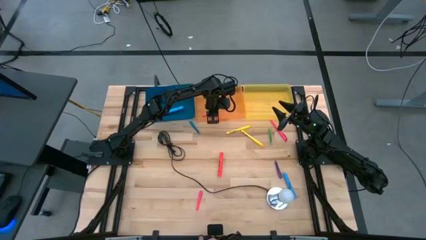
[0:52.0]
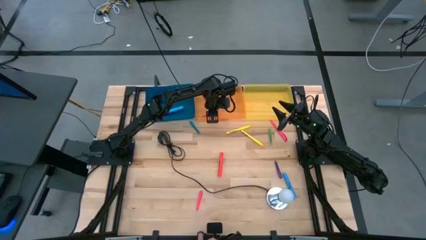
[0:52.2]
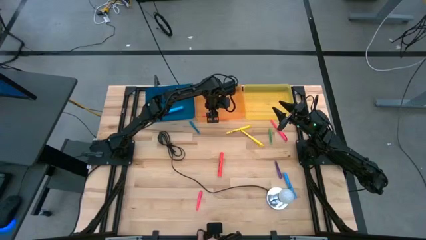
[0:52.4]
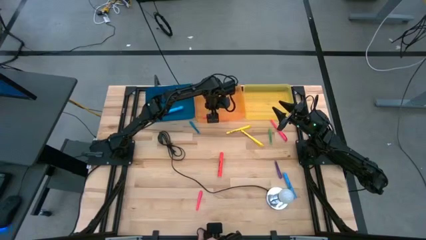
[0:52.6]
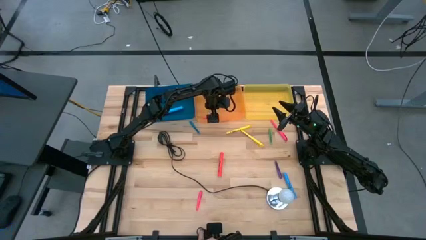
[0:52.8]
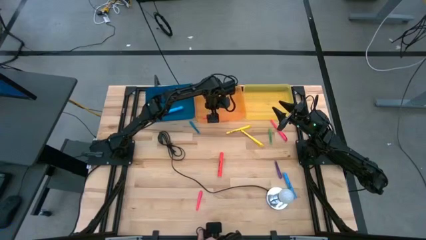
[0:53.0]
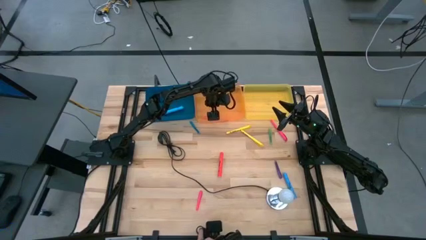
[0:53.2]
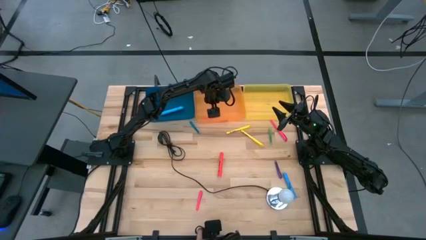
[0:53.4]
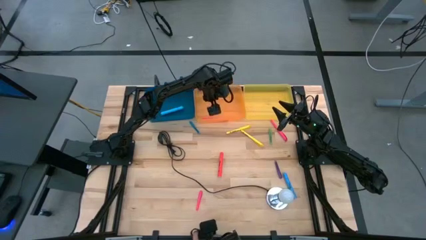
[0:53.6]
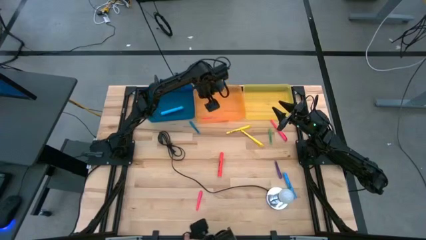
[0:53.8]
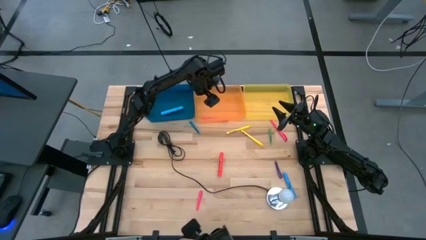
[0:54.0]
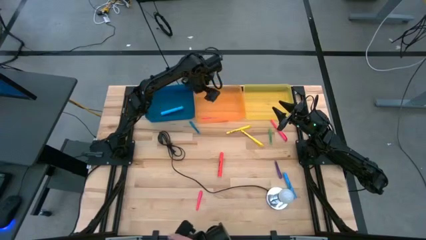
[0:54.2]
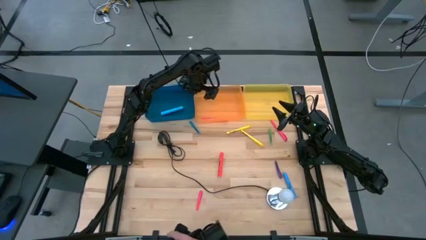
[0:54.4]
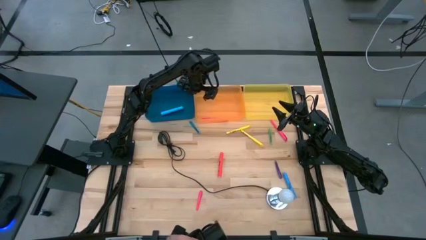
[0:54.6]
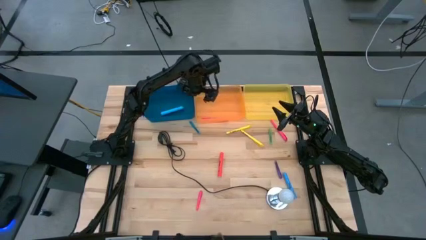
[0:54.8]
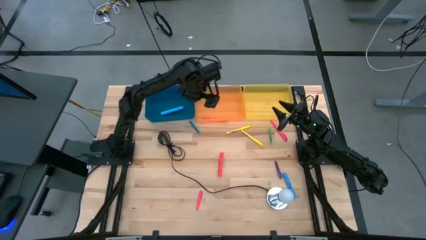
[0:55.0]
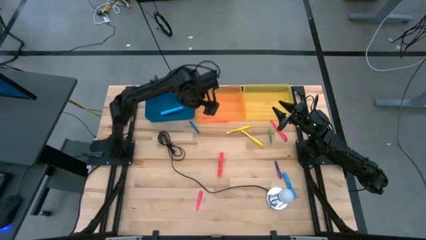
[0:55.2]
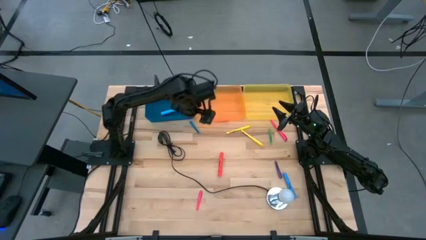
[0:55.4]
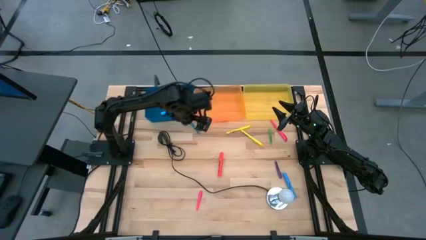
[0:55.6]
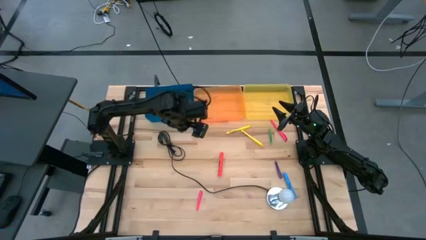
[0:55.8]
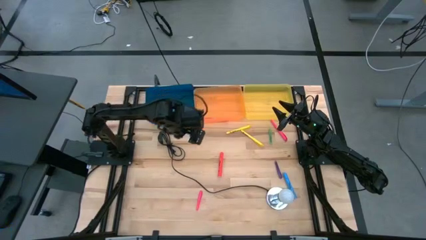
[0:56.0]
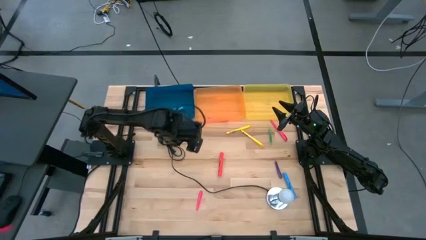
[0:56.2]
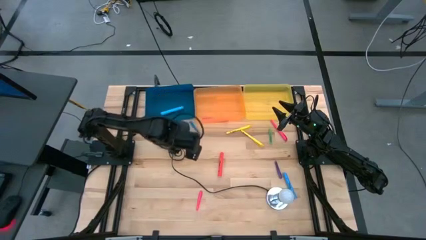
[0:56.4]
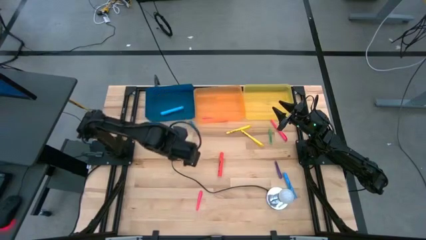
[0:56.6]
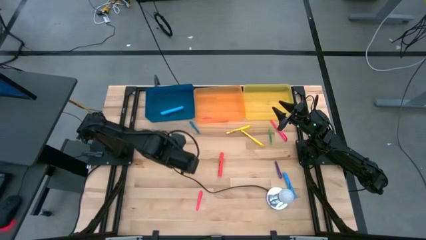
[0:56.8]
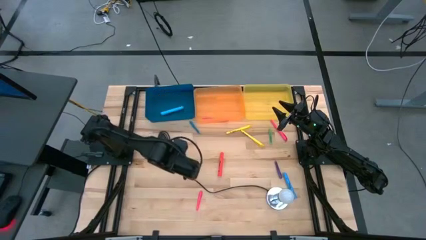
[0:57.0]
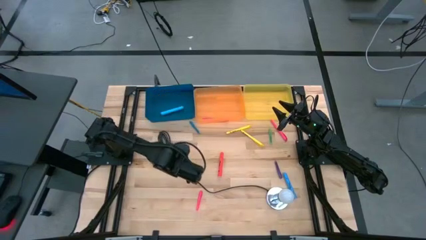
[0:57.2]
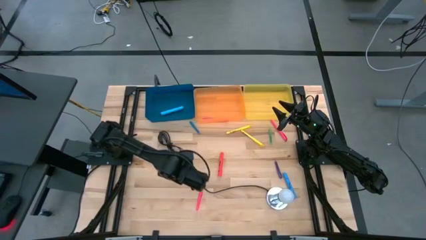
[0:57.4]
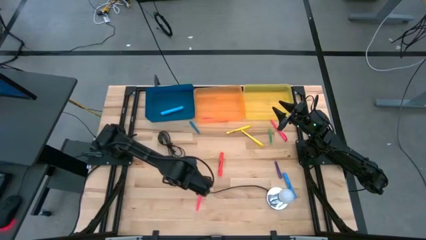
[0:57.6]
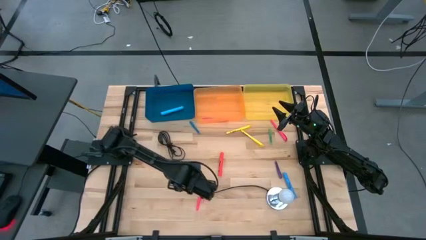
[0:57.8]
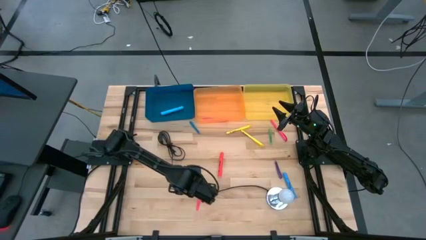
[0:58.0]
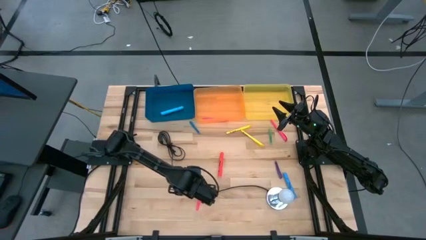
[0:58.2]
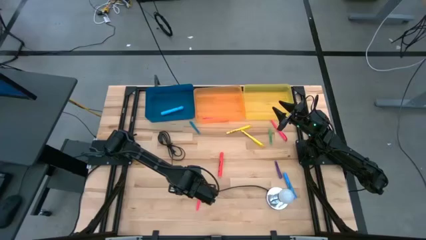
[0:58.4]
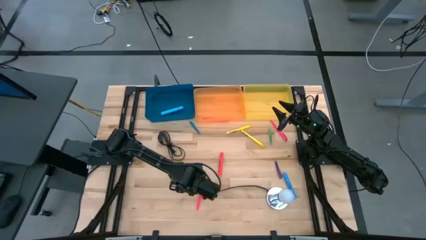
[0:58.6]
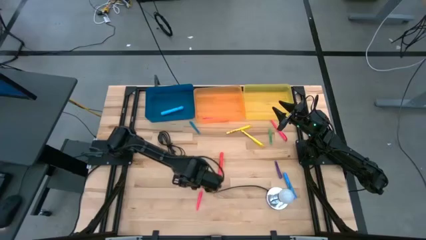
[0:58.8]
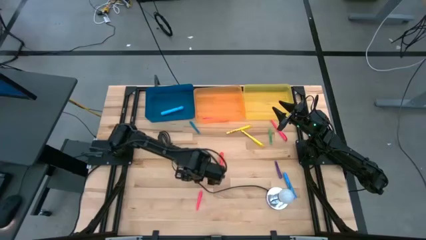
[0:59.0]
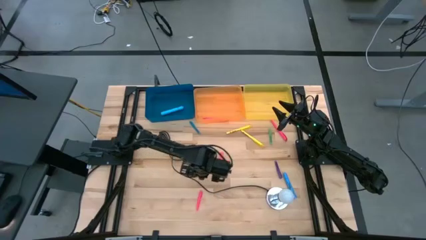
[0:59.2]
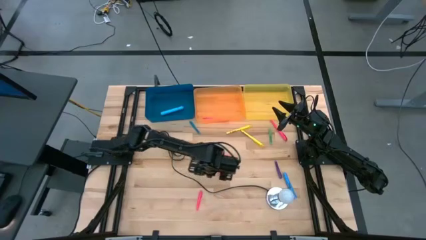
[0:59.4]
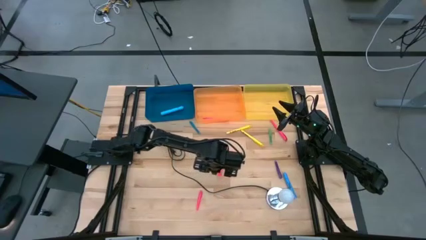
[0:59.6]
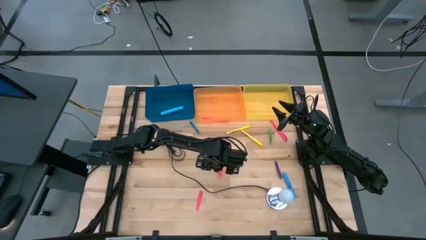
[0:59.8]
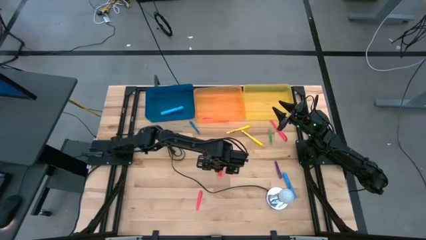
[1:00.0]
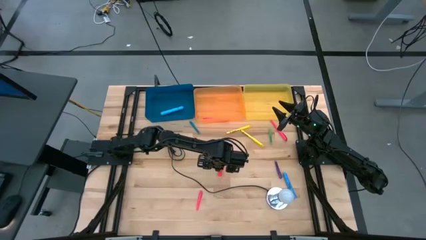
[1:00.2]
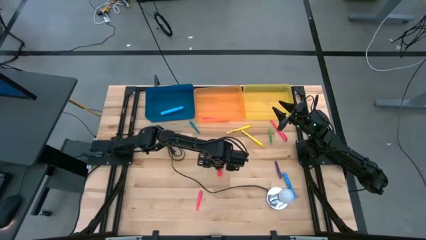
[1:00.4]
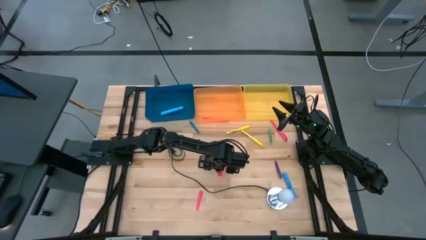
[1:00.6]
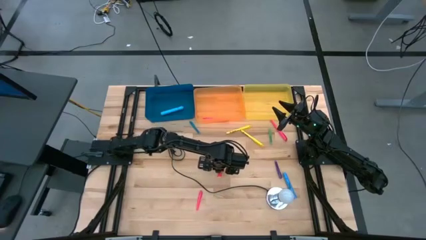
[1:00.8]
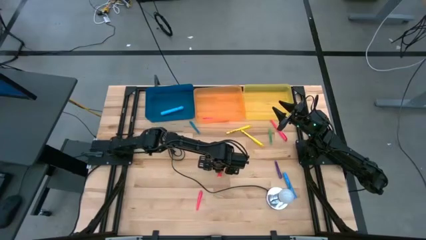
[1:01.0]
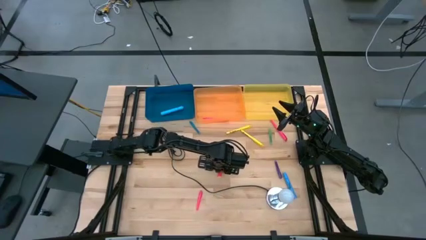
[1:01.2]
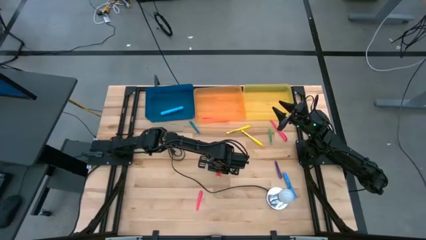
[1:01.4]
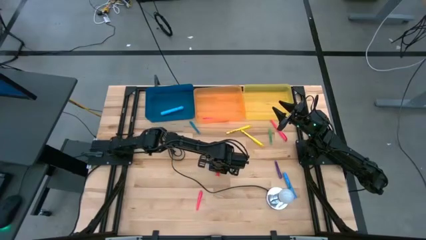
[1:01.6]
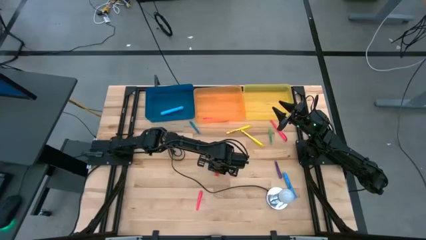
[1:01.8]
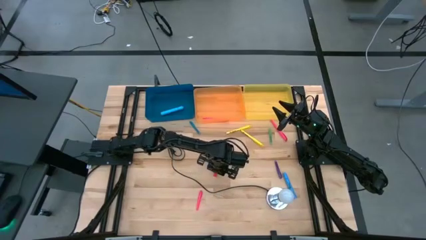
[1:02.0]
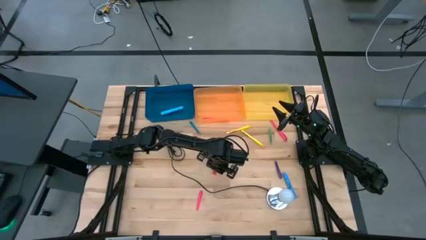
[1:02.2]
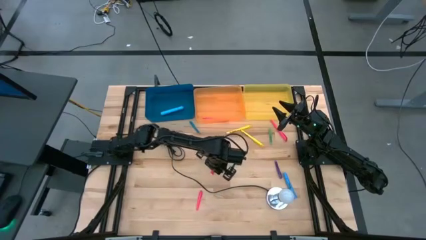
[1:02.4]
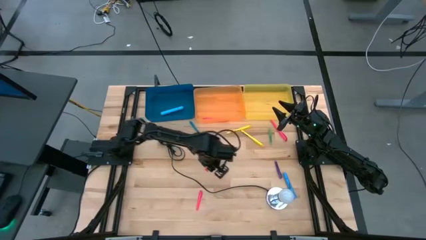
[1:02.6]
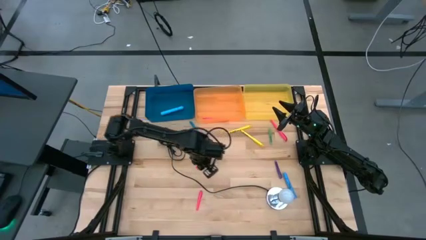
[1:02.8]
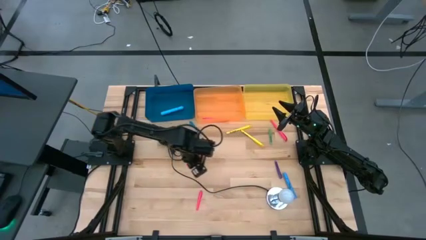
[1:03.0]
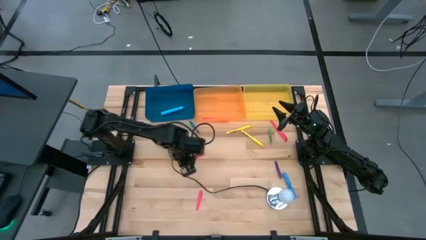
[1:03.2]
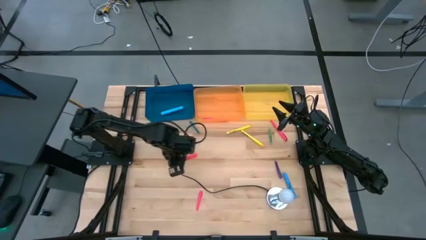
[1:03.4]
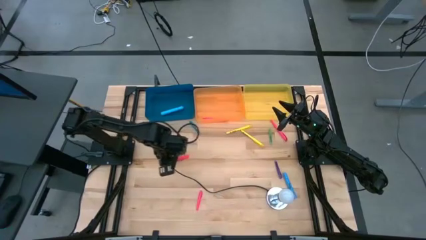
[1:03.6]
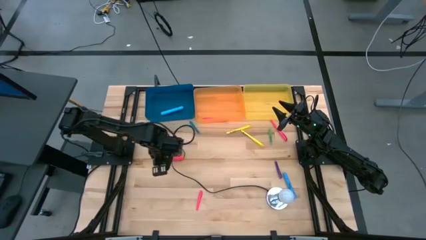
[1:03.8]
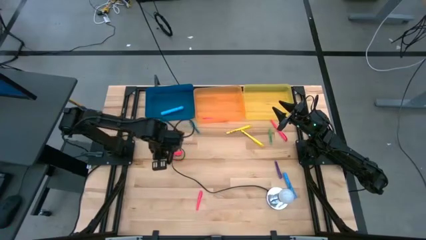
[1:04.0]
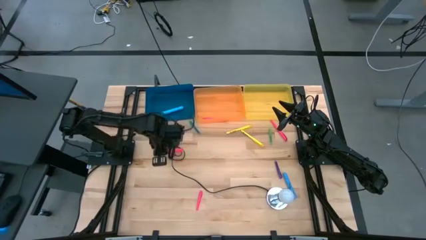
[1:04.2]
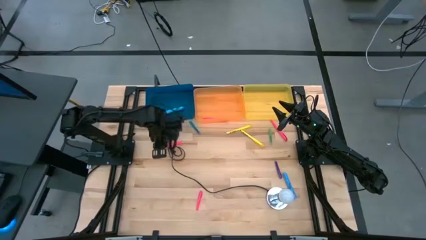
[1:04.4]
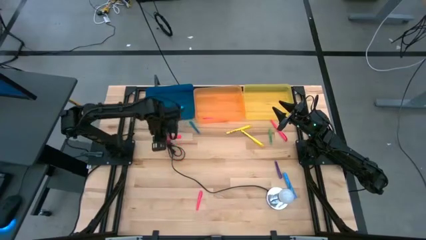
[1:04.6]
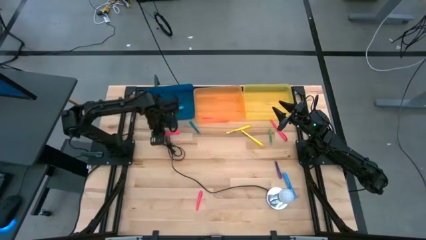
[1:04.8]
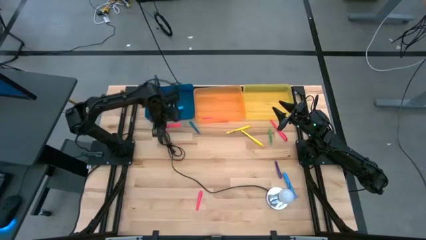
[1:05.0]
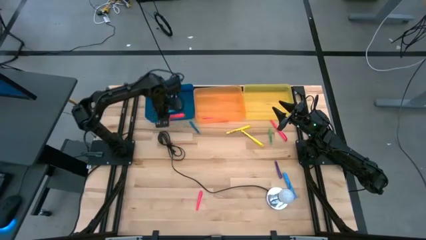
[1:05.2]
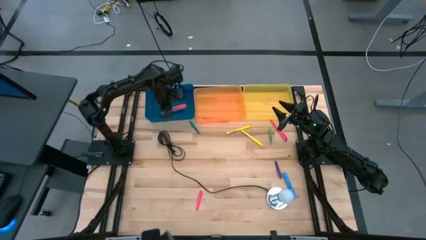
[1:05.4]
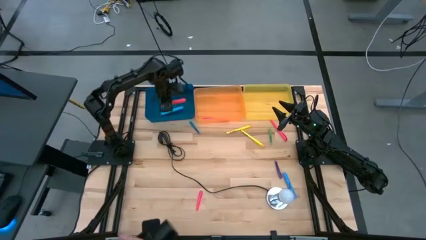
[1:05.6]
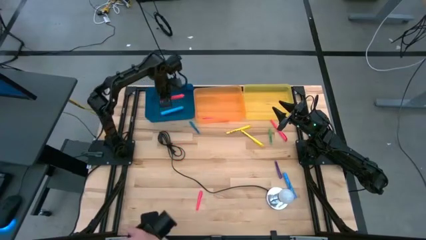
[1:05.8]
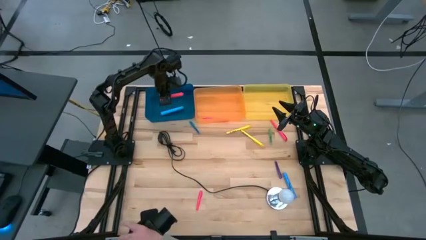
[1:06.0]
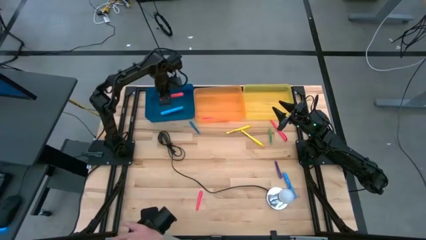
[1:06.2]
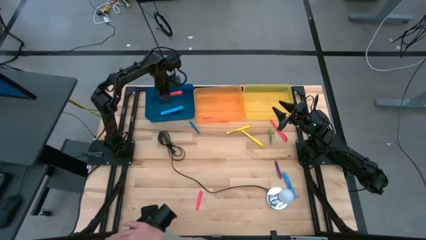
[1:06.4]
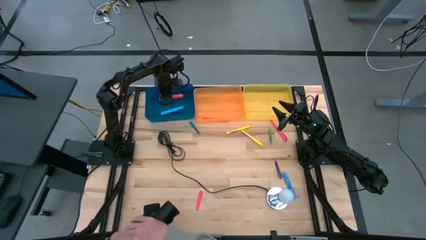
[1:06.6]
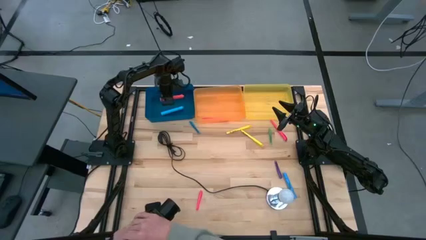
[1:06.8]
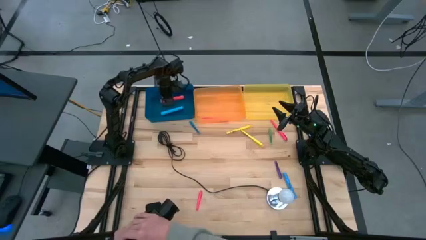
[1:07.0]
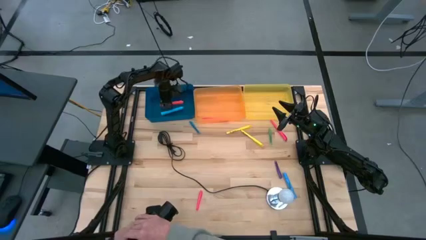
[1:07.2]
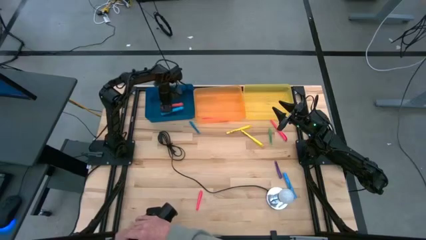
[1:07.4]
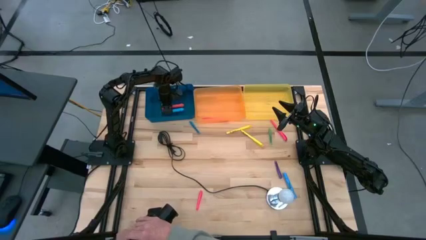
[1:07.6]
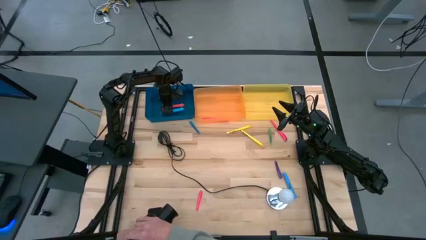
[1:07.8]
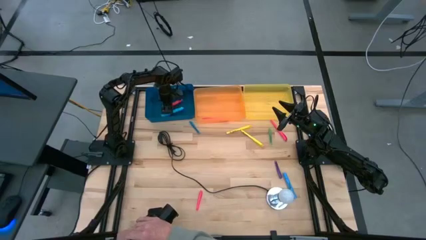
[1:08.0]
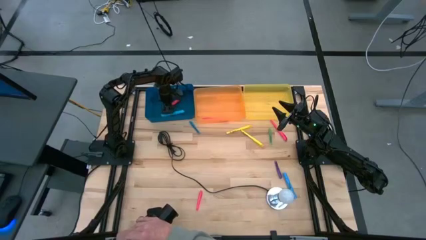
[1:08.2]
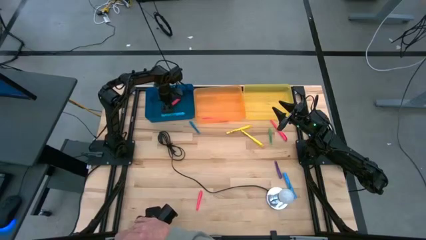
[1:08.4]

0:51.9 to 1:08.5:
Task: Pick & Place Markers
Put the pink highlighter pen into the blue bin
